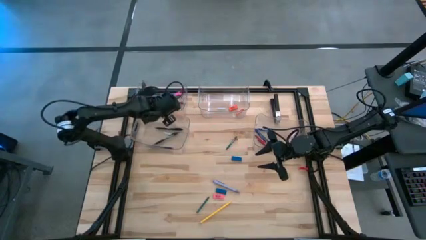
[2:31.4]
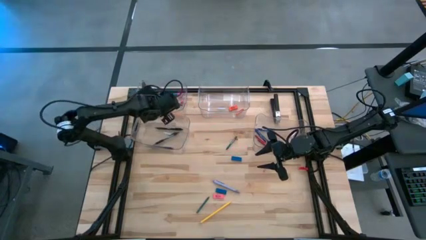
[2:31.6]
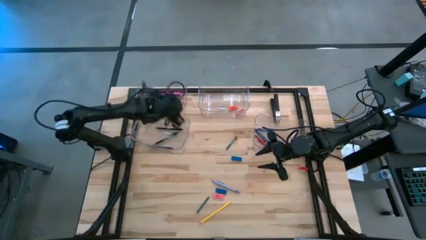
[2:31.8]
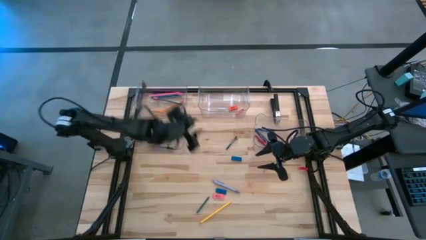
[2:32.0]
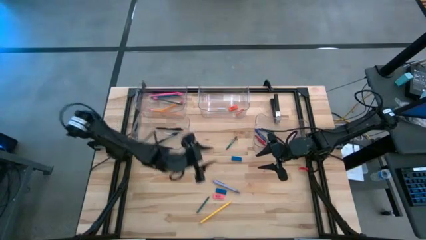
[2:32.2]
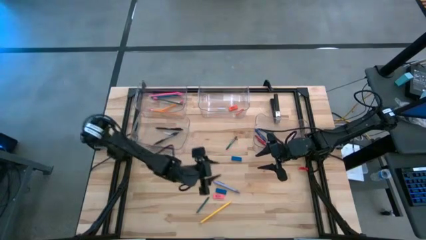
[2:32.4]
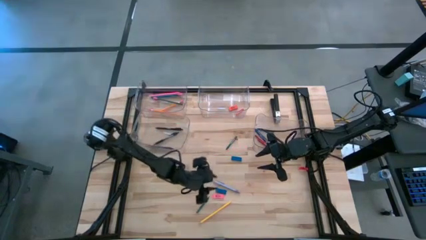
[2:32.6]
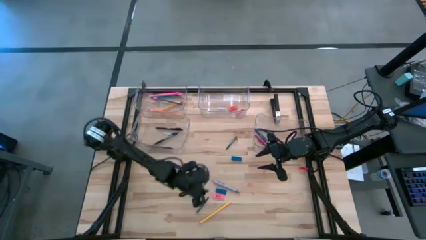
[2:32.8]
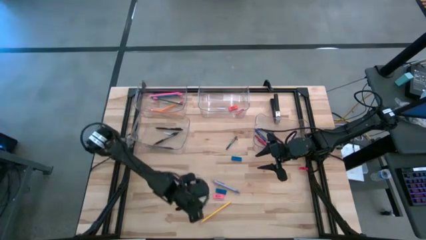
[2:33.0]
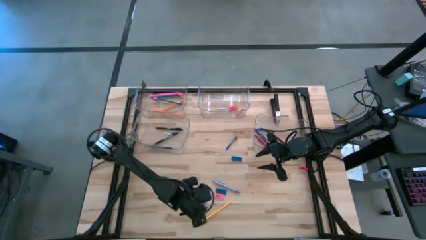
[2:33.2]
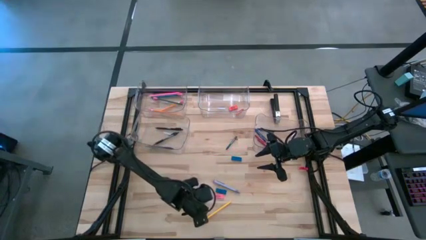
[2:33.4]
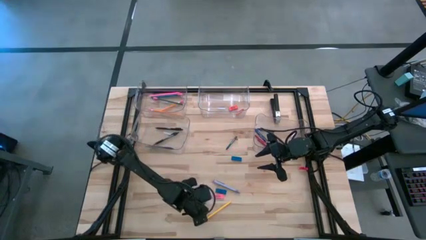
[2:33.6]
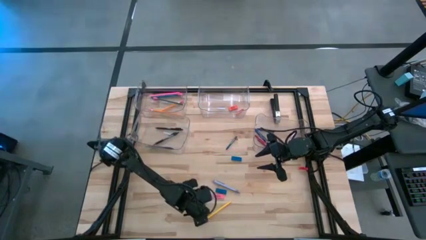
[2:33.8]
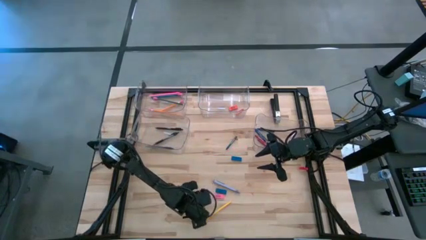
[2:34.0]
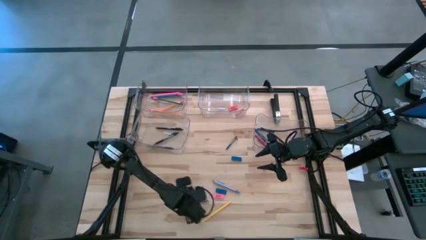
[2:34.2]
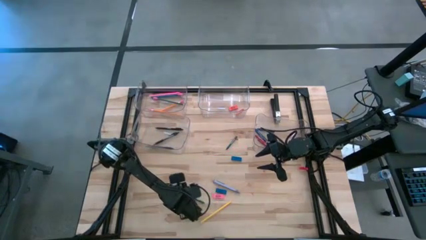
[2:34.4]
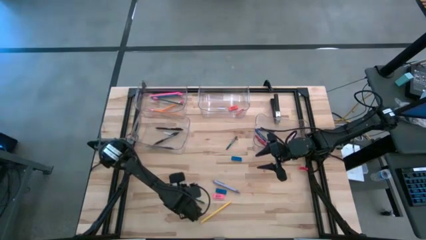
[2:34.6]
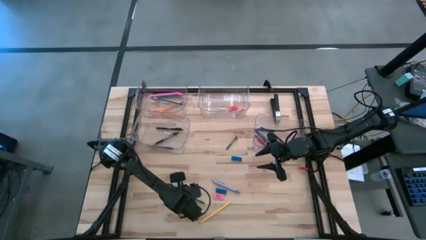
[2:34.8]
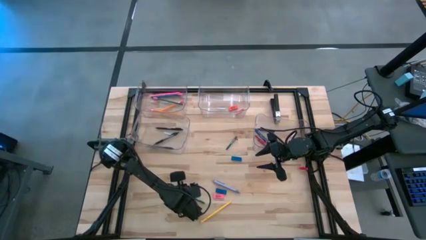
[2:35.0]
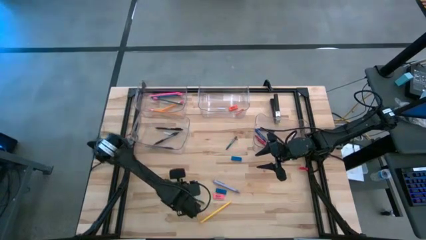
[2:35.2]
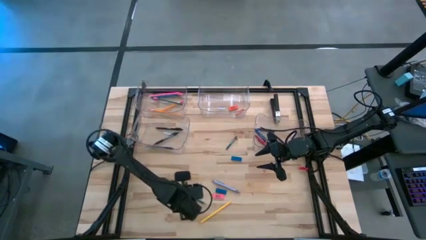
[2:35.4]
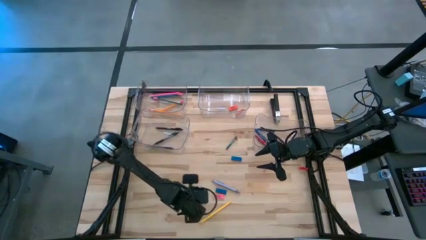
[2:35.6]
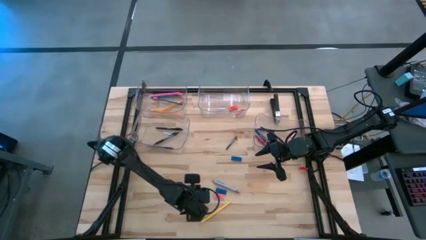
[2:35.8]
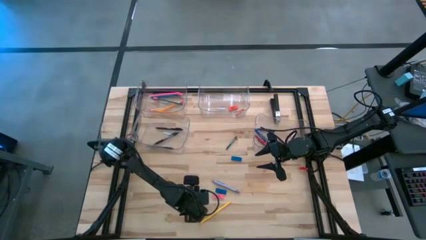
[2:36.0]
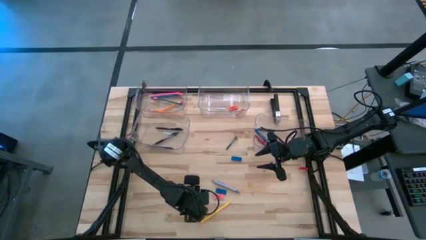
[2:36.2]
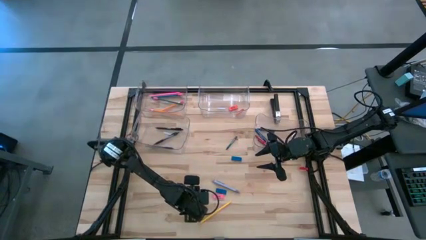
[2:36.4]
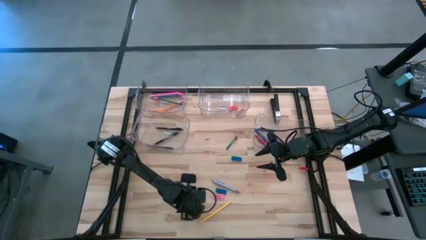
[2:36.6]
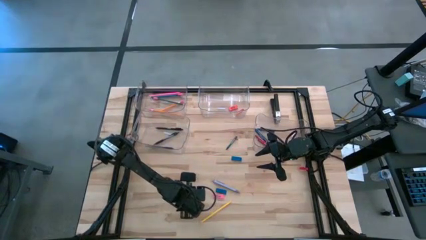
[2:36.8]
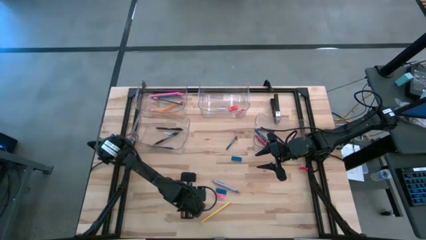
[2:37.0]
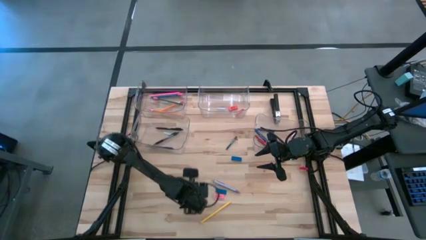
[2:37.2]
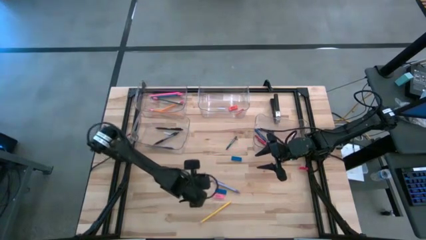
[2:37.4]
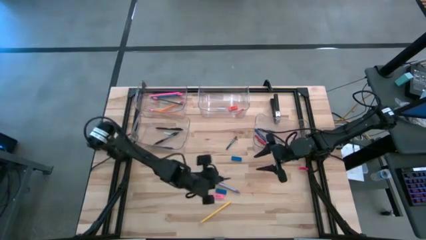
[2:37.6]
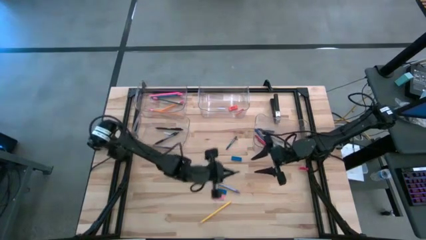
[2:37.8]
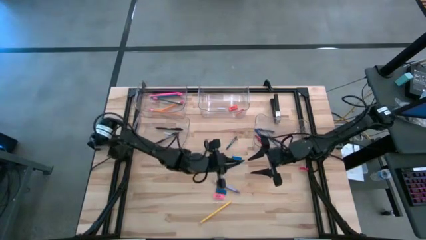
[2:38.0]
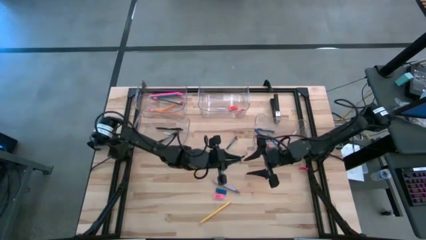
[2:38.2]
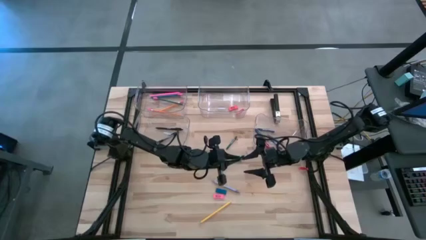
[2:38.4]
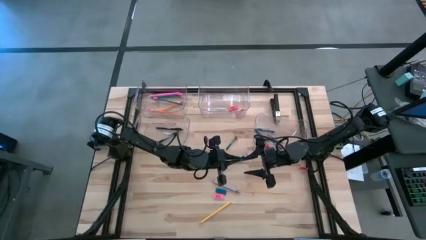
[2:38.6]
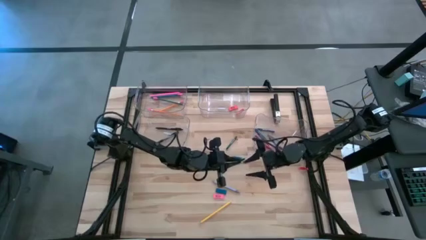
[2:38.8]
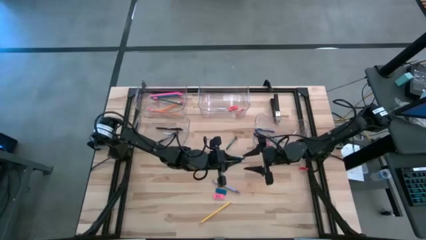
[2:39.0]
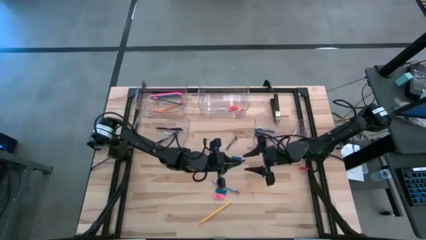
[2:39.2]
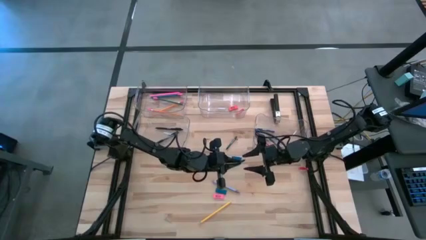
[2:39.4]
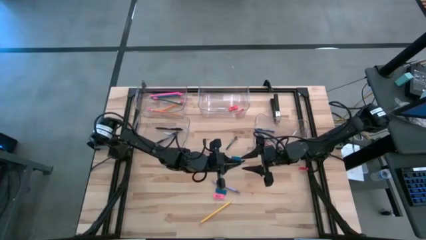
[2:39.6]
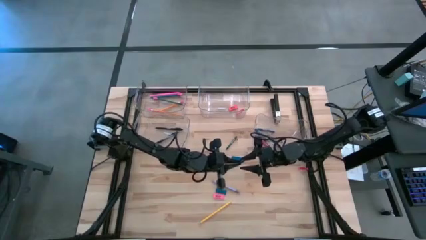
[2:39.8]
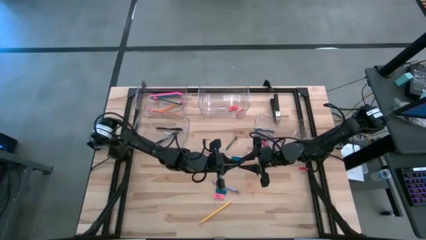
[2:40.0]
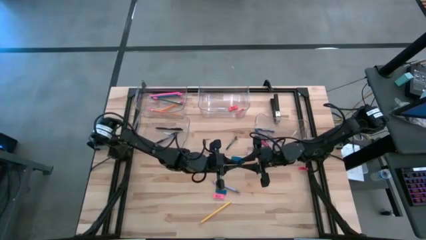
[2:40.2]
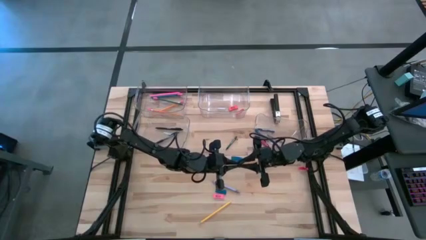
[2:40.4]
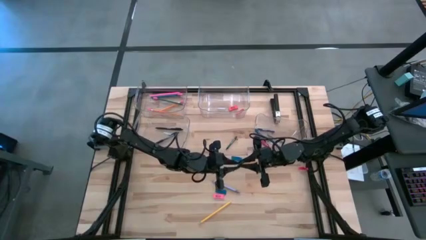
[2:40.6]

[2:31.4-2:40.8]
Task: Sort crayons/erasers/pens/pencils in bins
Put the green crayon into the bottom right transparent bin

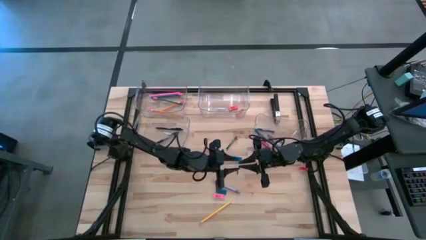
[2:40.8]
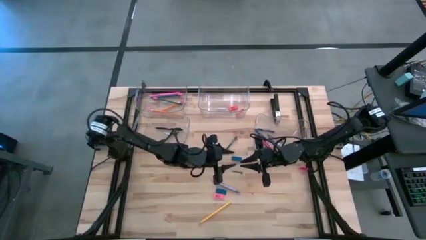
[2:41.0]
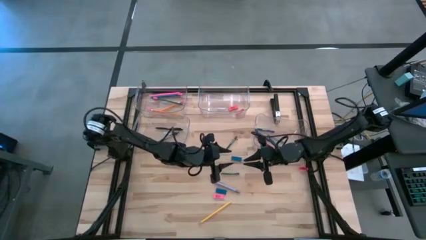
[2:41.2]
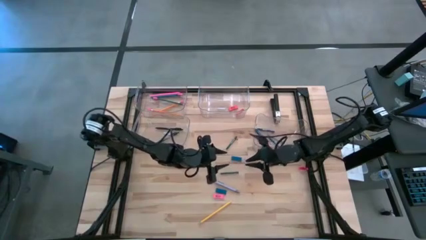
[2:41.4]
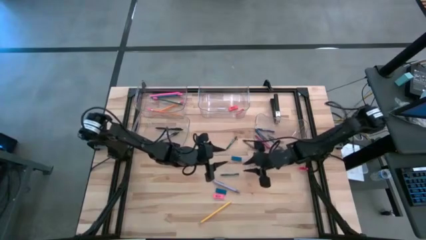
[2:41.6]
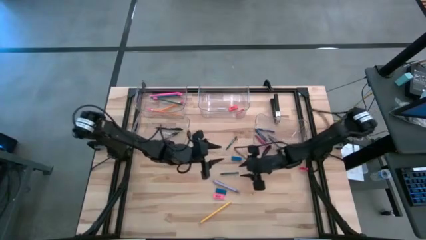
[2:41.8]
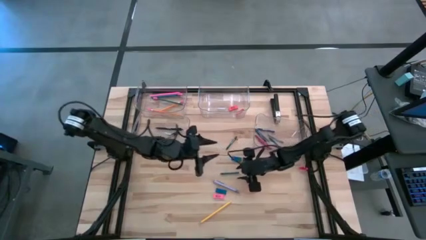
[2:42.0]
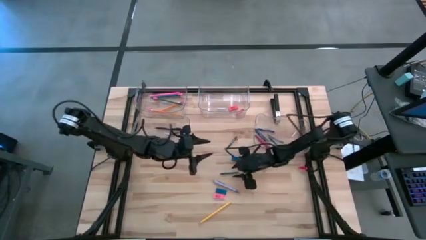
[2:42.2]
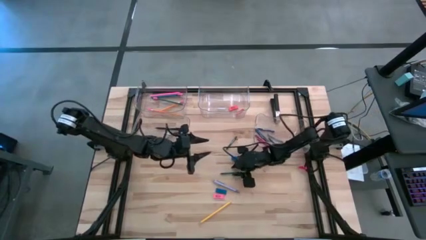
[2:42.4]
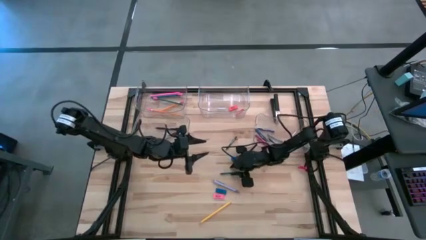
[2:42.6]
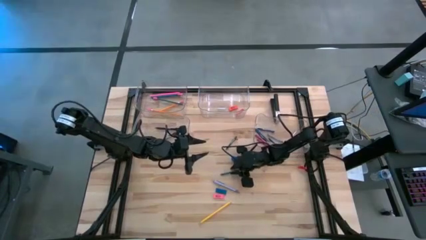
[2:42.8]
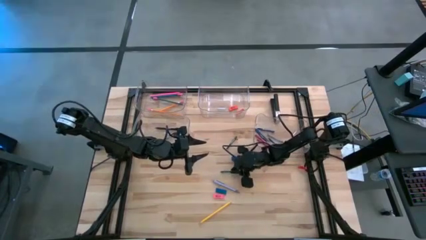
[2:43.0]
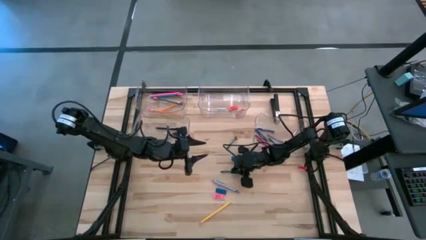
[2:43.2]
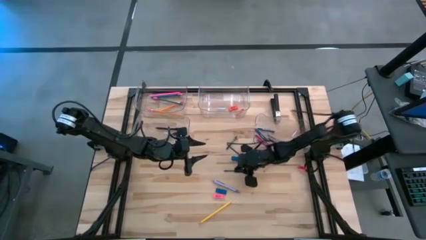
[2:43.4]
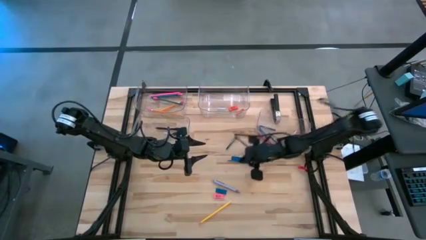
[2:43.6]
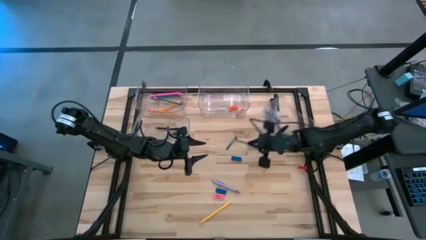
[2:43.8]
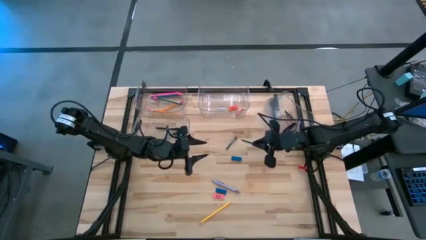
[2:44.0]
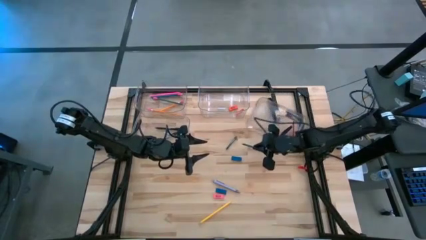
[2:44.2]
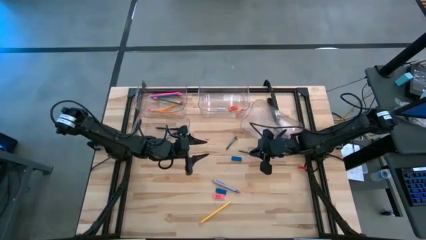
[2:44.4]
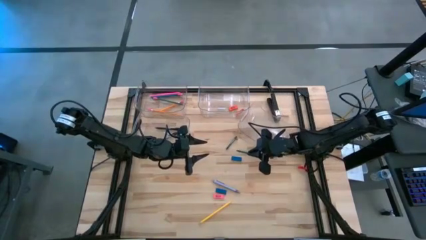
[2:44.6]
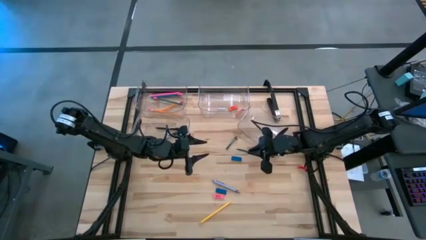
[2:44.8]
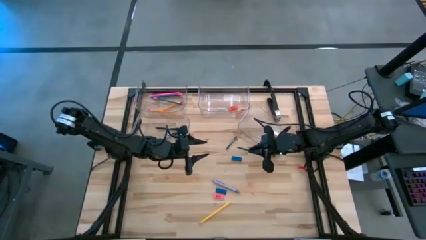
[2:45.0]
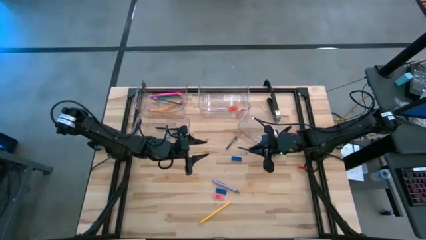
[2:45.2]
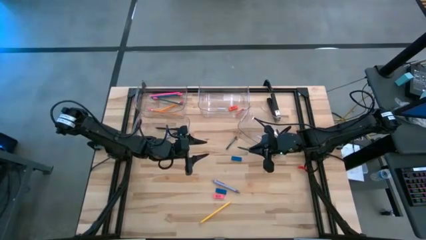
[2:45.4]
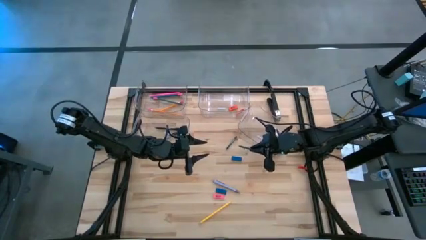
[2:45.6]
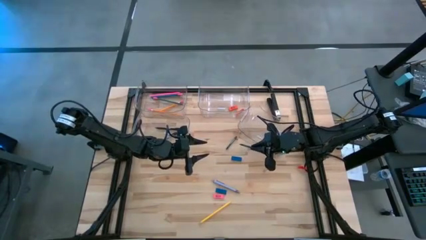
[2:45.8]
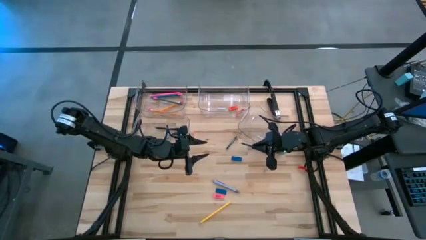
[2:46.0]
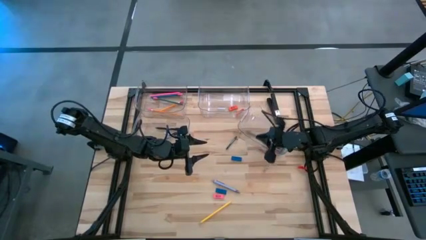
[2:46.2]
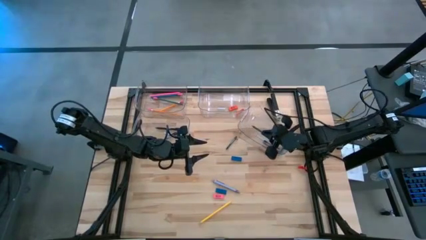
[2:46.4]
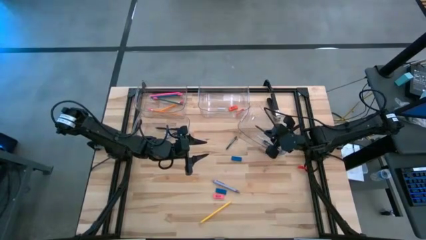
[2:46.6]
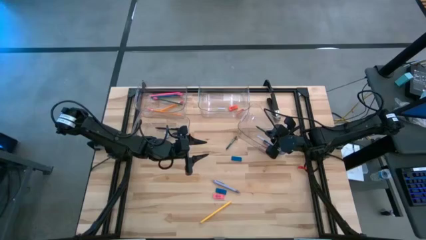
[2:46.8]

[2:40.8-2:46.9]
Put the green crayon into the bottom right transparent bin

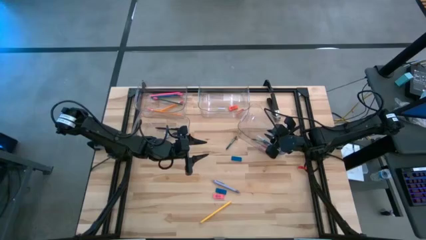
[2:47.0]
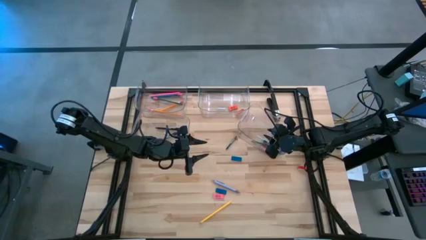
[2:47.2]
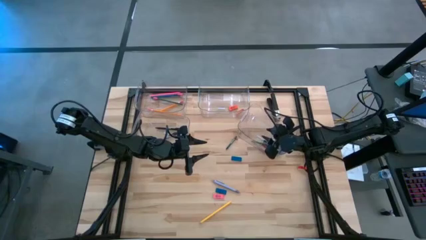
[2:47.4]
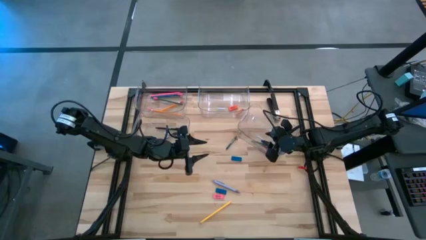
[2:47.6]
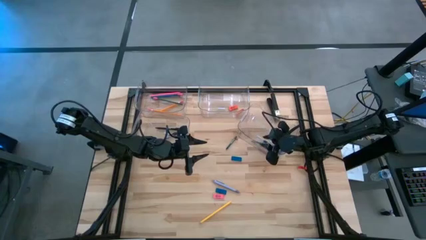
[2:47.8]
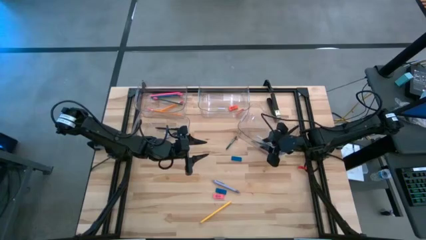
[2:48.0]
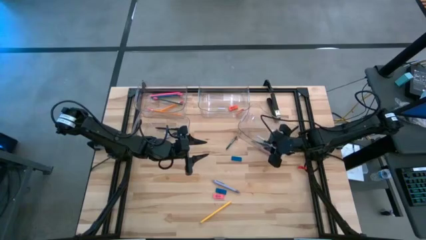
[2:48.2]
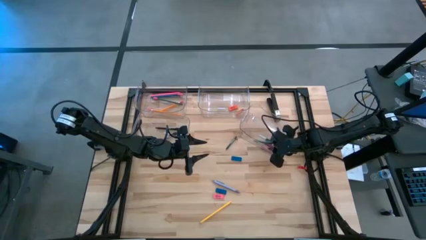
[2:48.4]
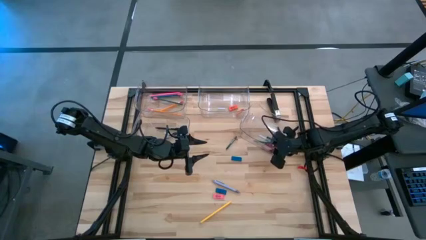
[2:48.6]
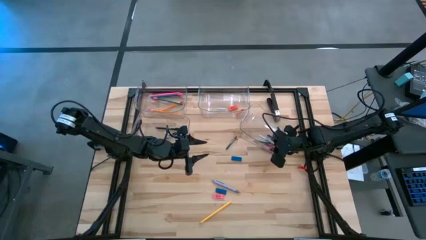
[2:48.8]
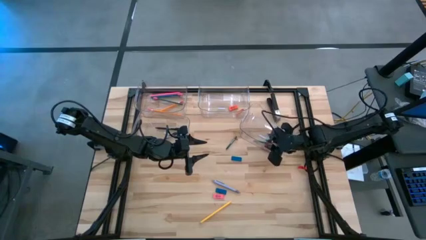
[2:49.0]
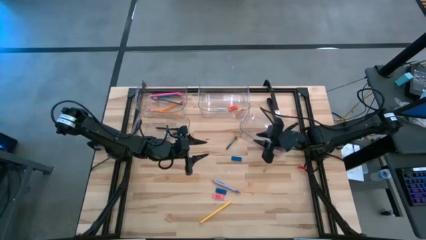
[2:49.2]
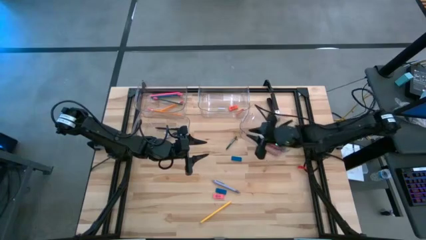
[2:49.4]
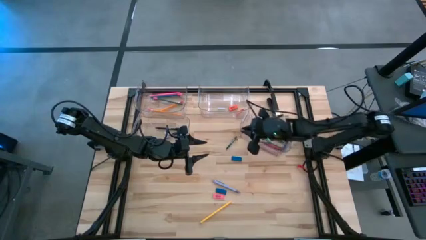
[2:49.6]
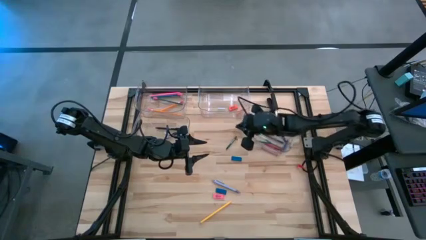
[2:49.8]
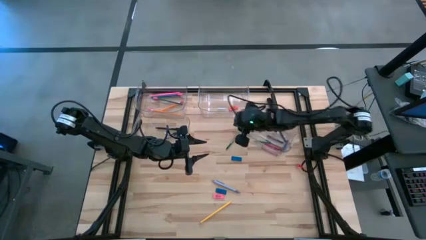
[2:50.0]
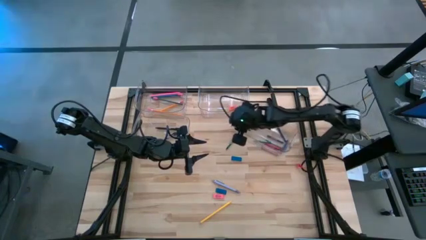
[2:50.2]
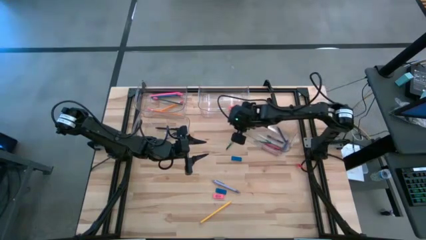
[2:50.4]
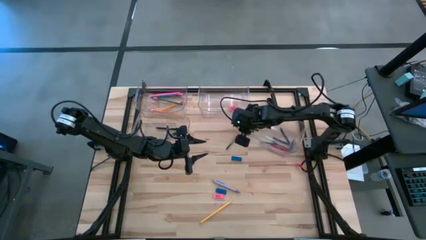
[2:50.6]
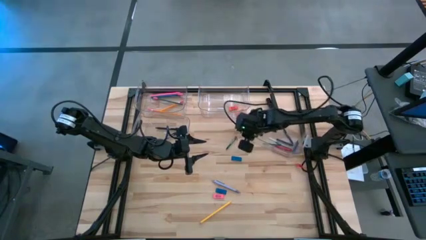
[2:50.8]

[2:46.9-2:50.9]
Adjust the bottom right transparent bin on the table
